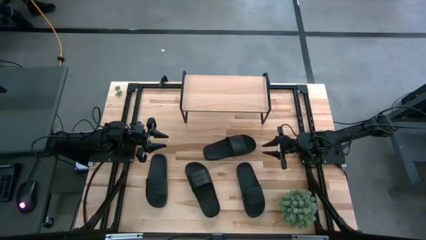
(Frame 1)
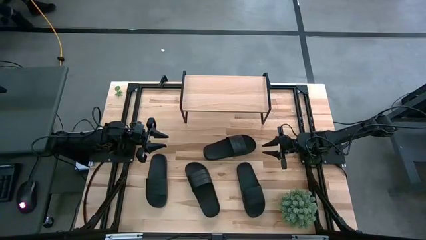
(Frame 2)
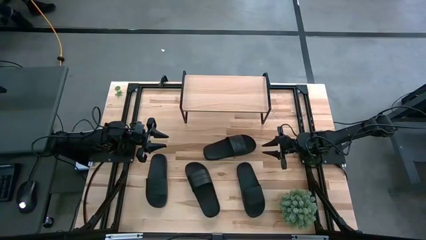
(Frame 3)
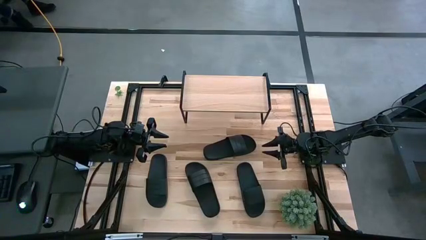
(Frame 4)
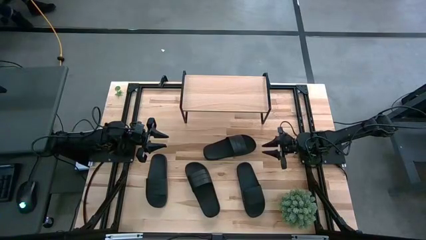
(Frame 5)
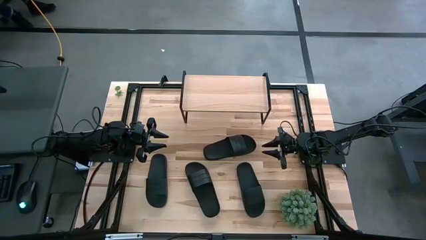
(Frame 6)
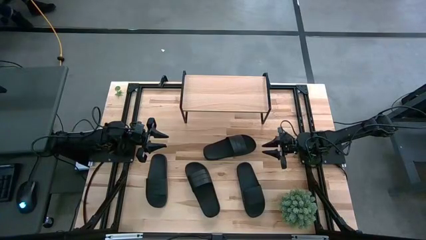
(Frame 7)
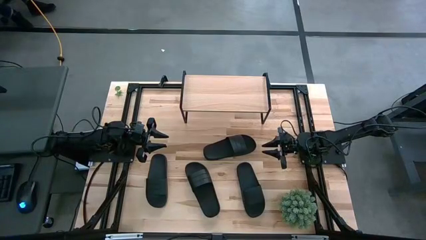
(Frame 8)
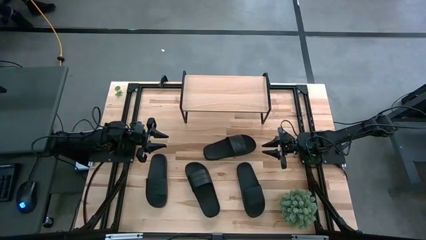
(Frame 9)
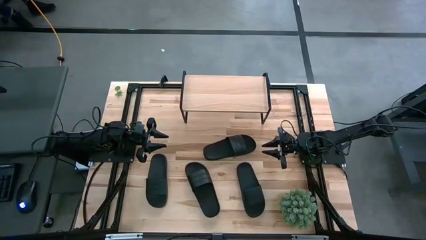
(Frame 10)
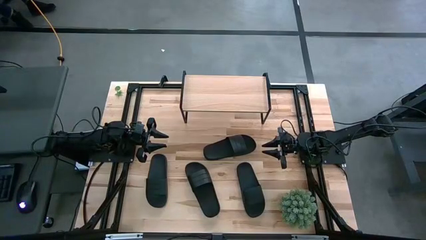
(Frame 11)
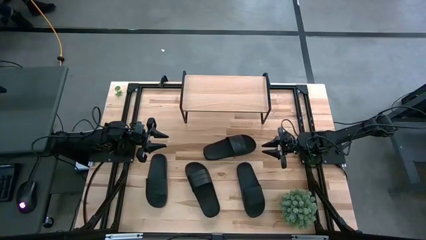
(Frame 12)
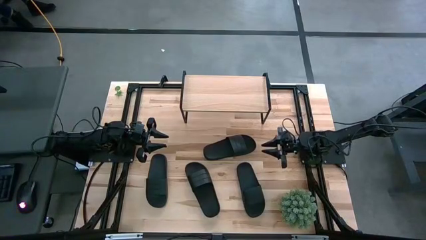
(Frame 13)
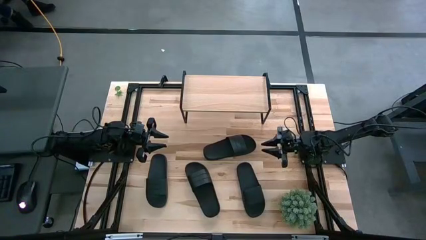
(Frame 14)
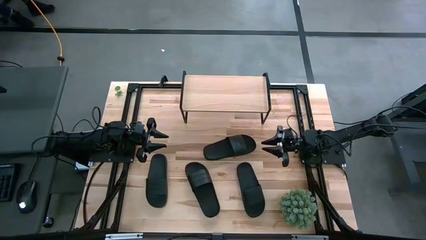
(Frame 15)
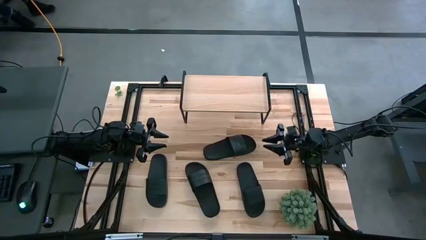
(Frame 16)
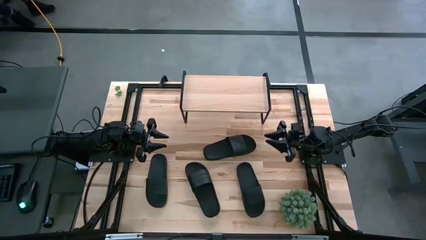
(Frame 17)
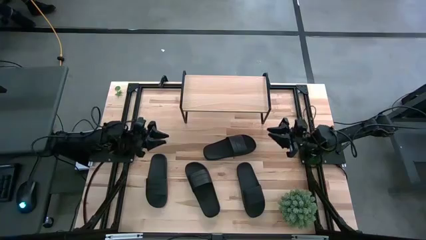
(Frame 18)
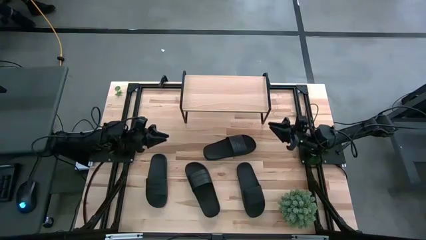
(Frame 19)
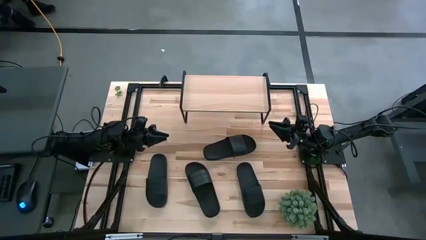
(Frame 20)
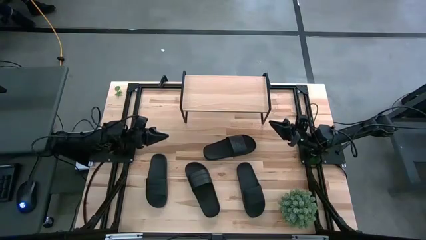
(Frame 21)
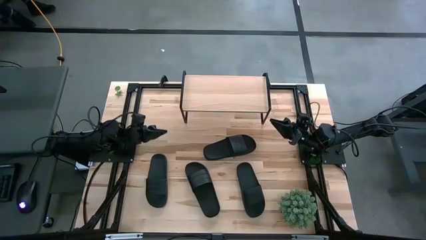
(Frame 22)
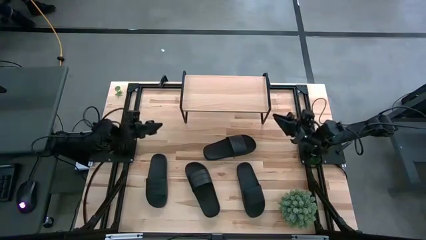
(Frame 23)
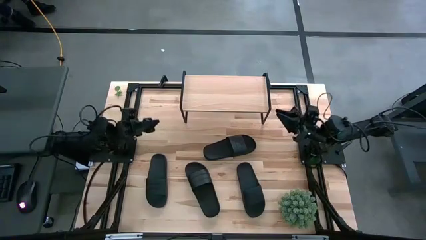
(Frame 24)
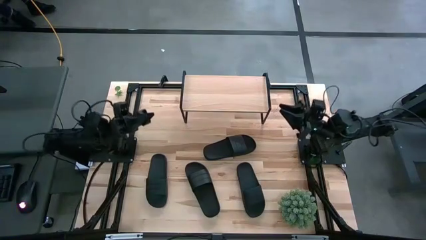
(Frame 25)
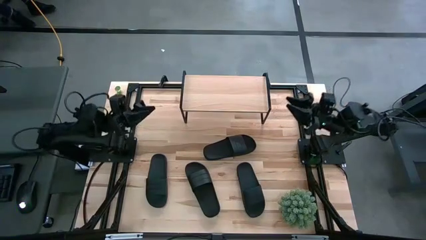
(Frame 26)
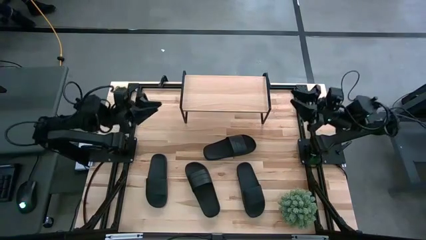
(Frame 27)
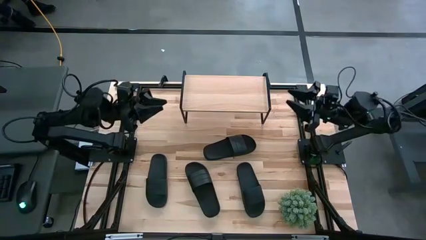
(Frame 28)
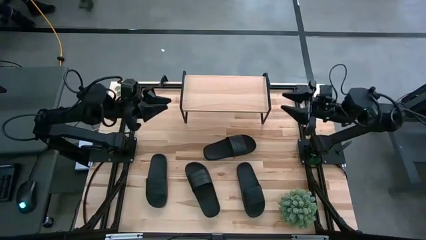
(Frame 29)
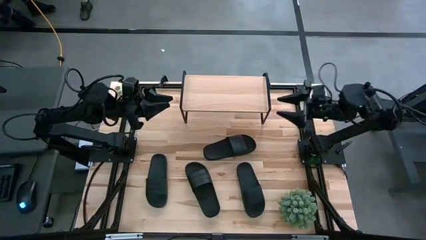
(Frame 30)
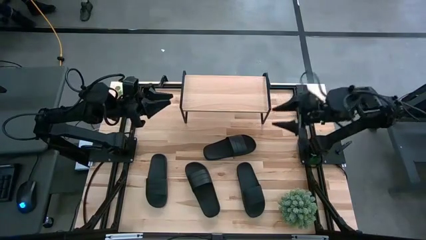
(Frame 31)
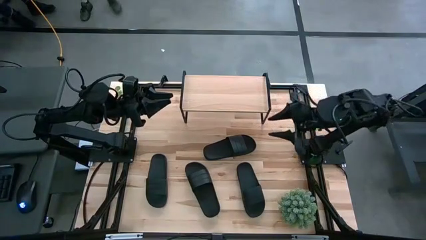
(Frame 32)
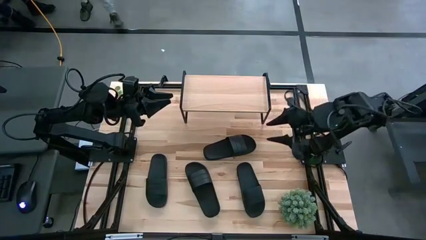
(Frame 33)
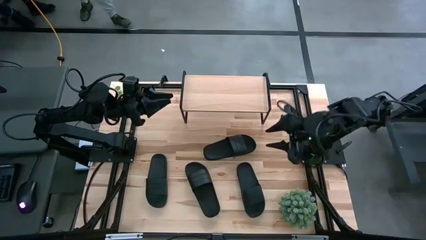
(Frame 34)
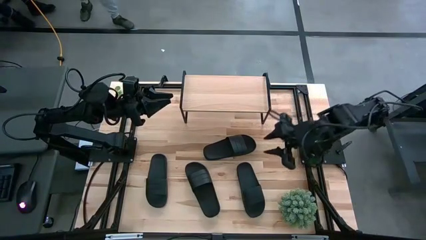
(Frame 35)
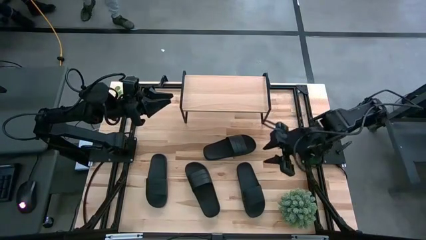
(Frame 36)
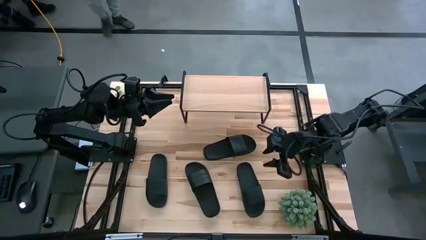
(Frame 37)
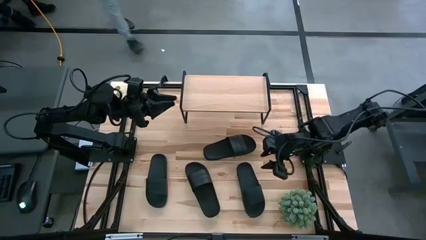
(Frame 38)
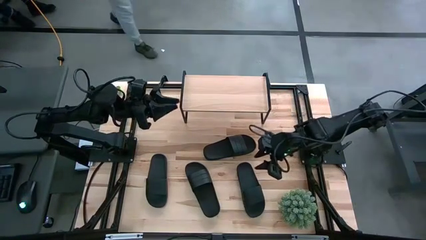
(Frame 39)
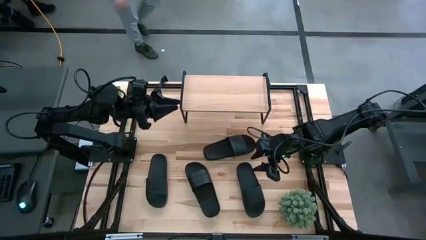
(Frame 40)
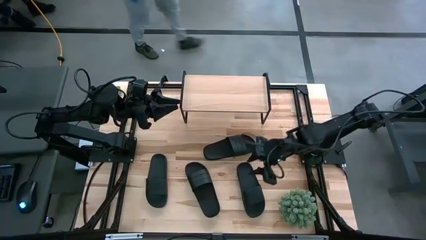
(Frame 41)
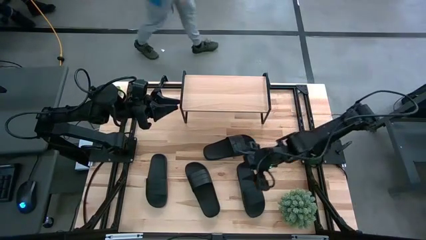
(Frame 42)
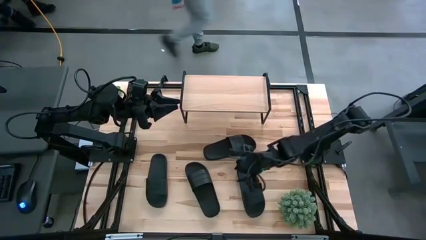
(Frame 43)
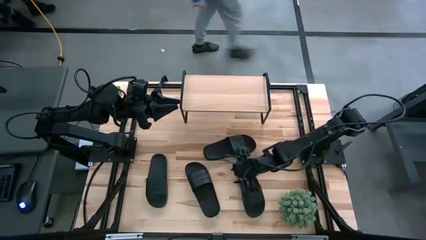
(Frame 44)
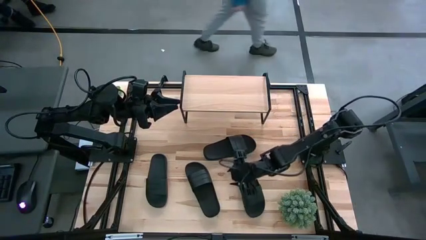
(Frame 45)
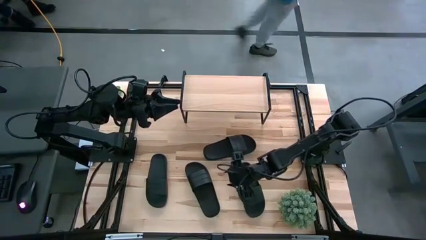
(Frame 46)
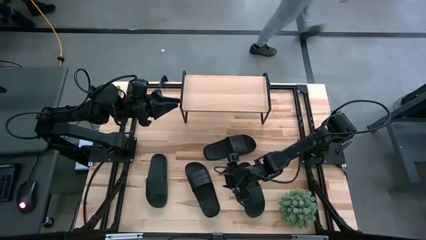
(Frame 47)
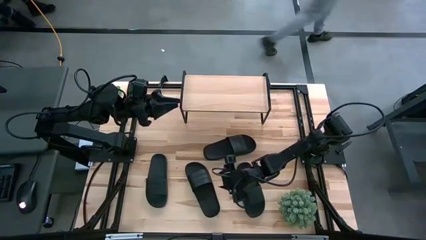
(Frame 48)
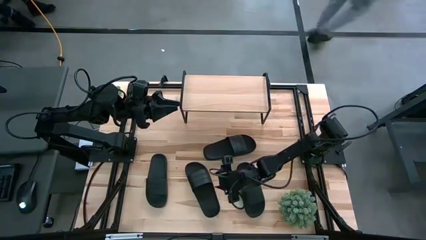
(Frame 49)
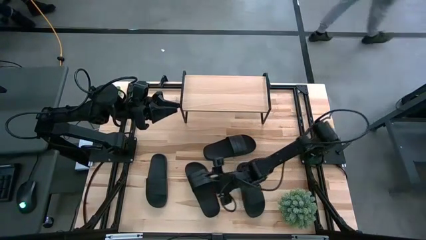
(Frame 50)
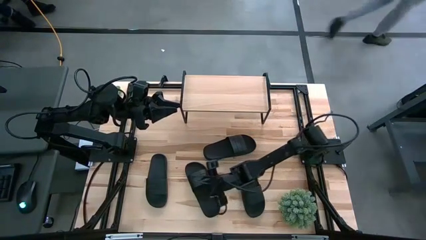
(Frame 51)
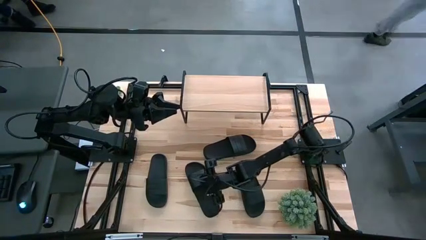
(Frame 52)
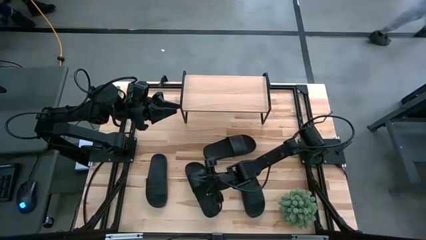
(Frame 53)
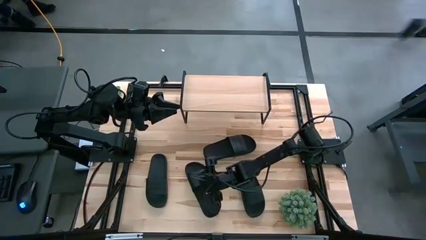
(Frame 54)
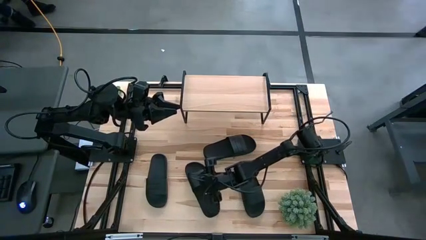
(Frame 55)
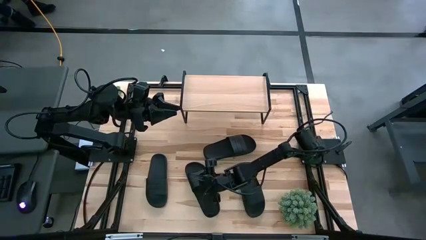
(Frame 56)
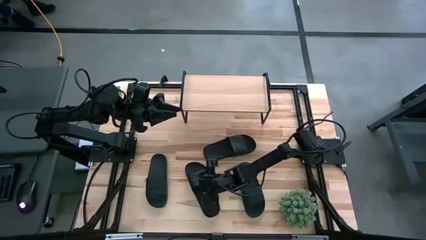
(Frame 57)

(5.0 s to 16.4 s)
Task: Pick and place slides into the shelf
Put the black slide on the shelf
